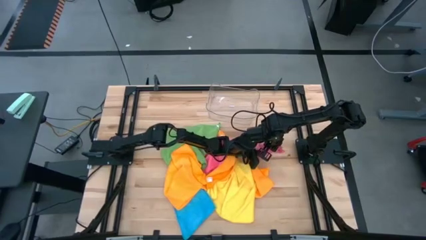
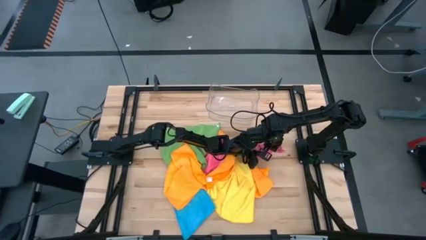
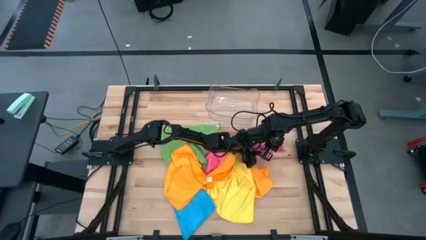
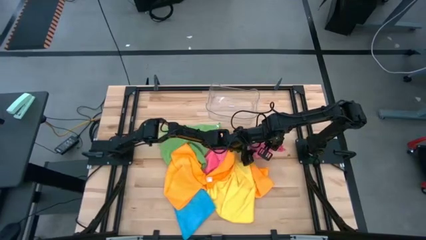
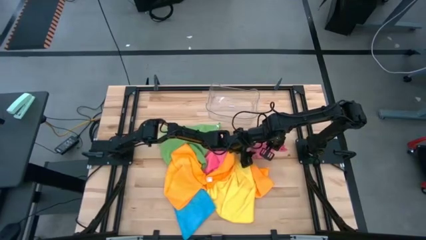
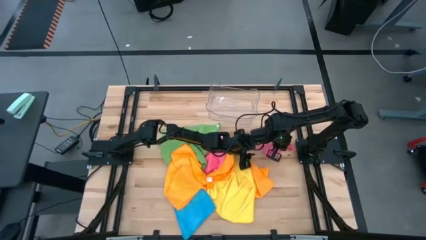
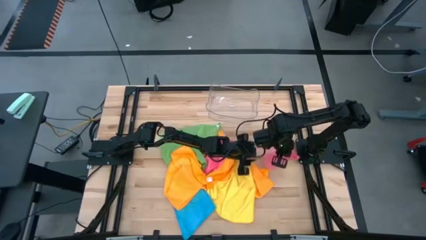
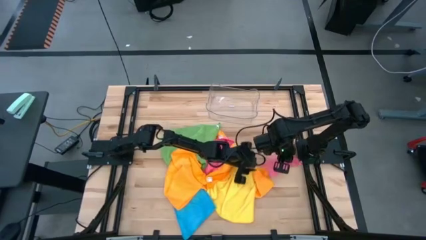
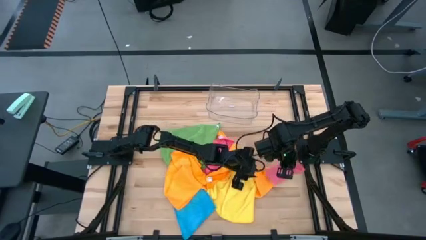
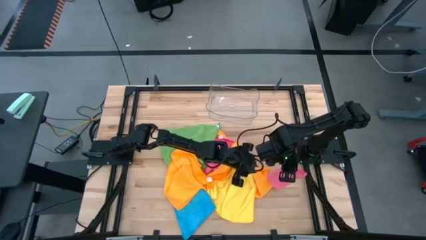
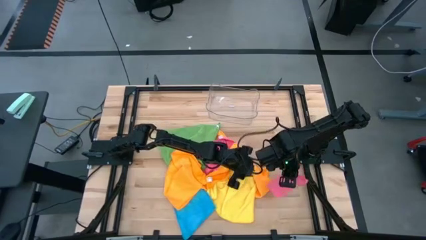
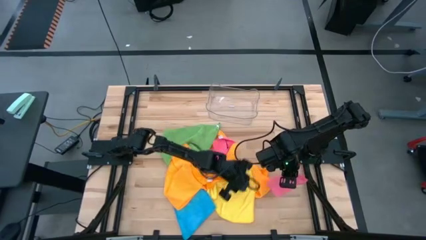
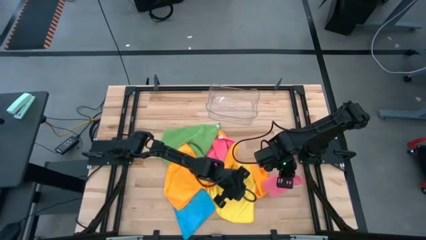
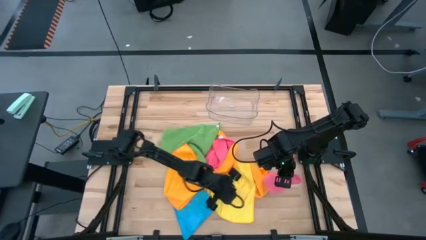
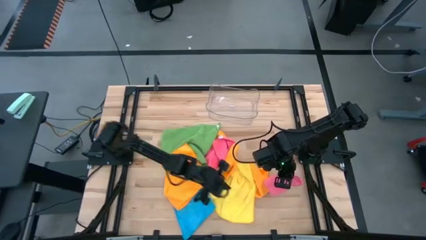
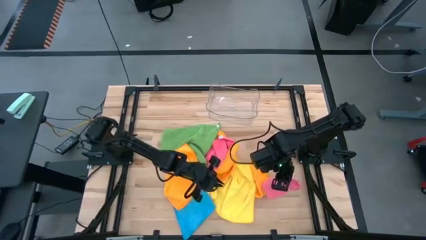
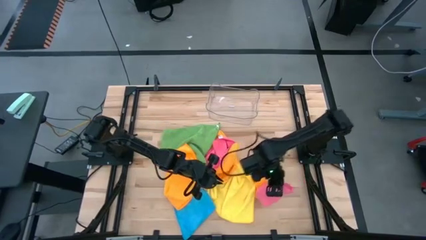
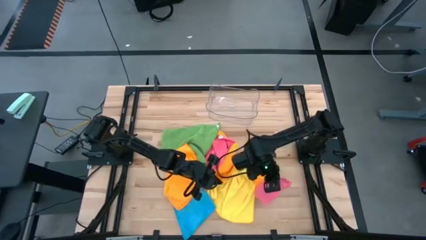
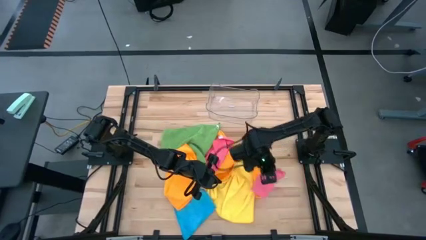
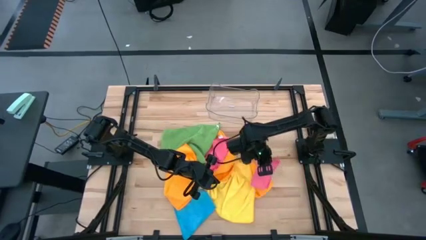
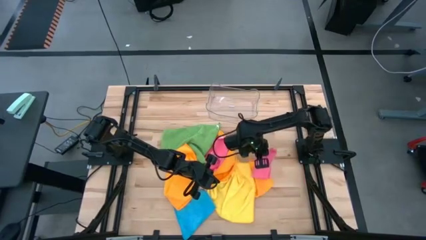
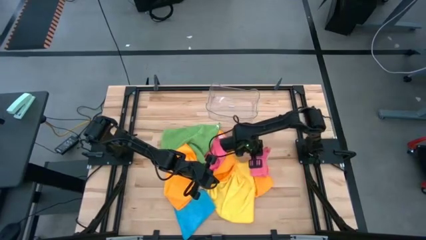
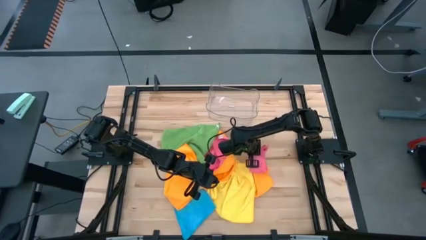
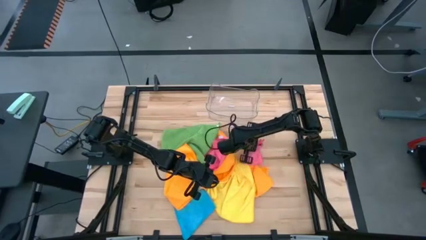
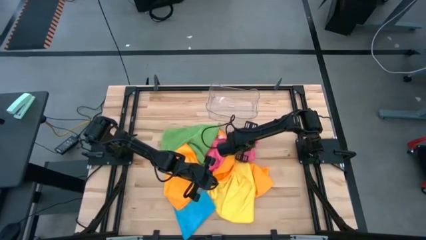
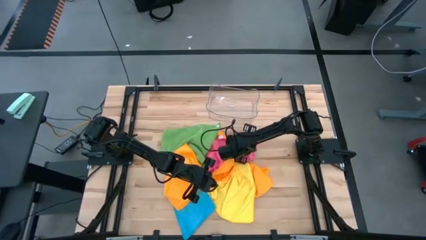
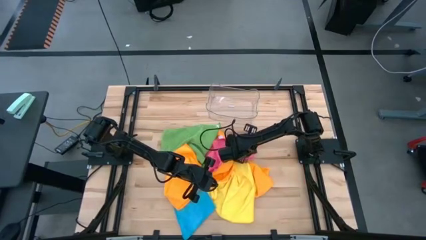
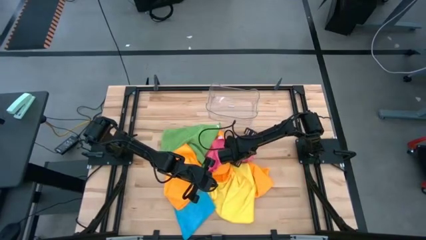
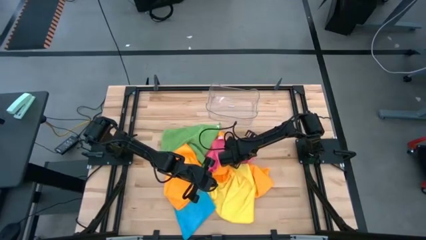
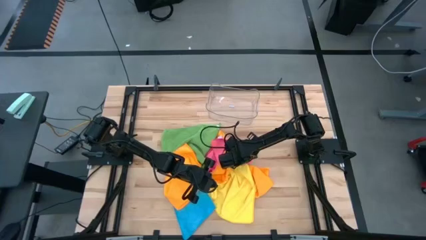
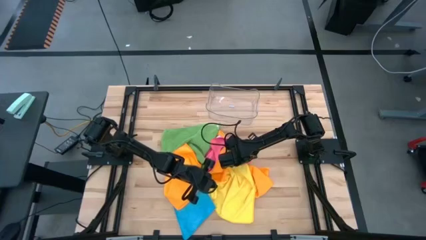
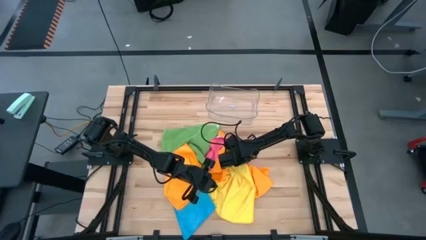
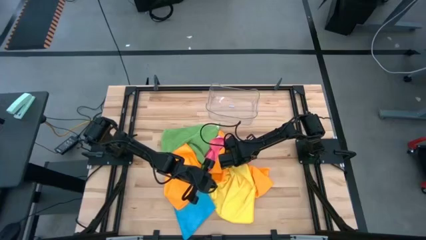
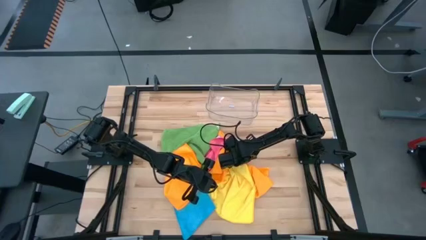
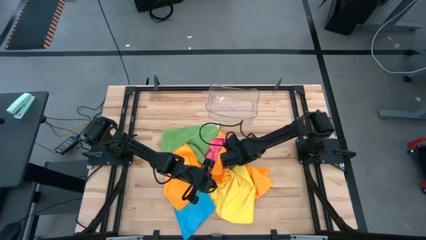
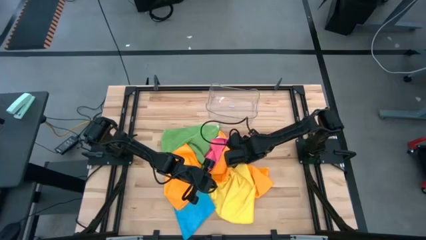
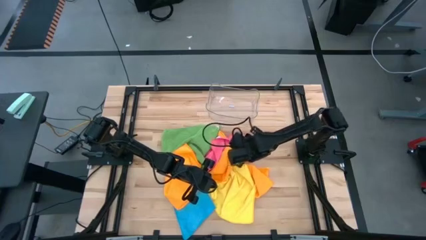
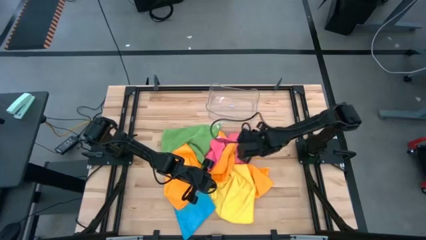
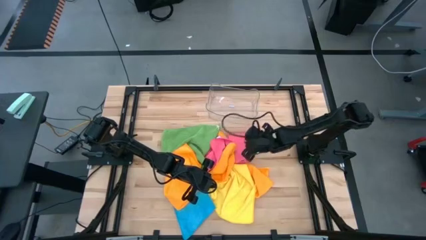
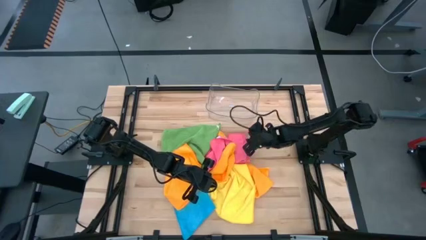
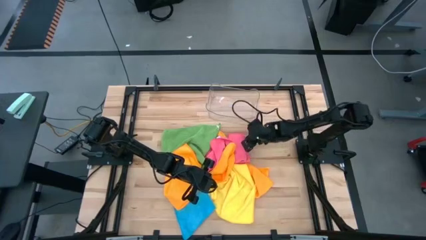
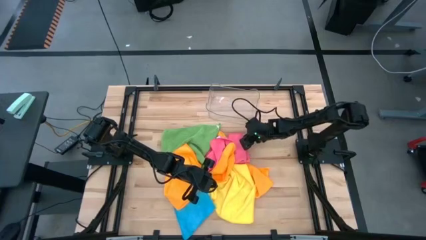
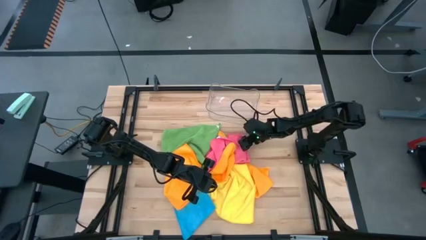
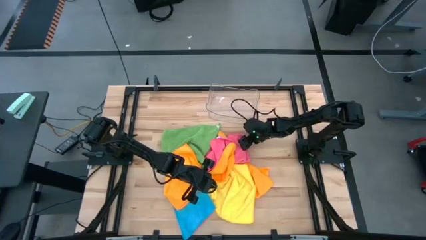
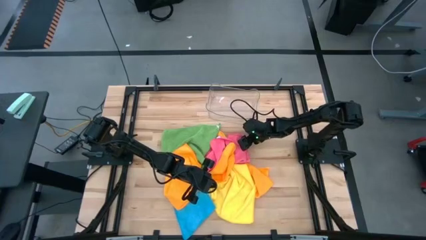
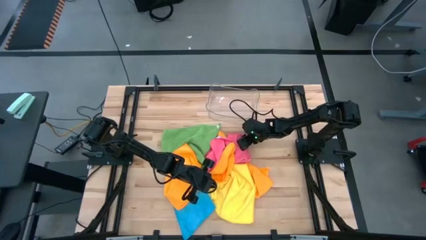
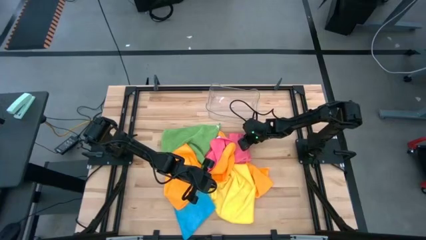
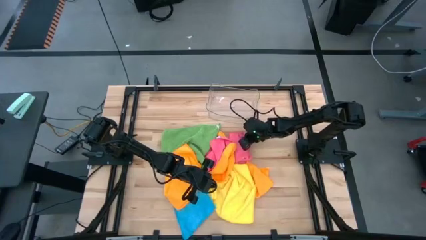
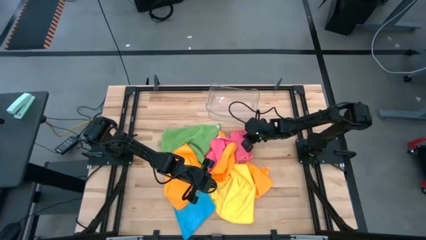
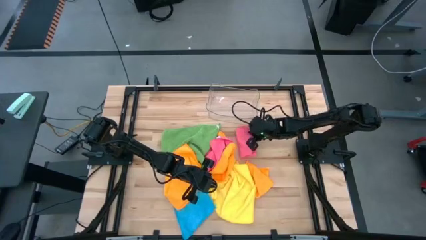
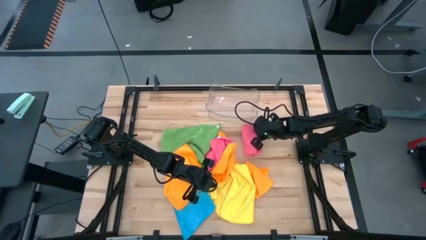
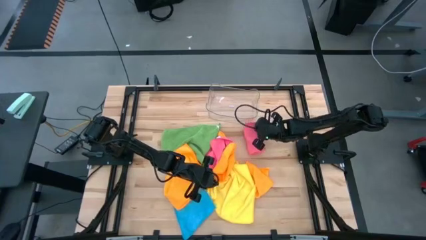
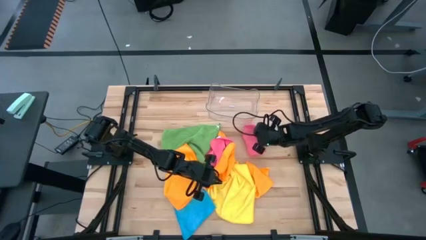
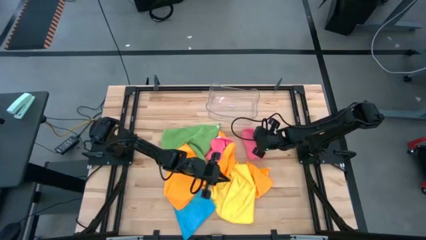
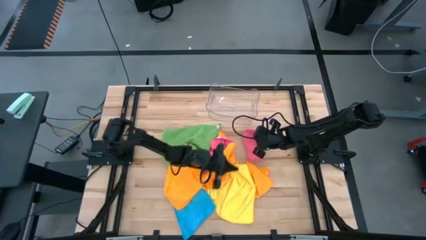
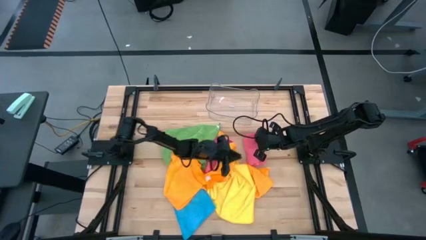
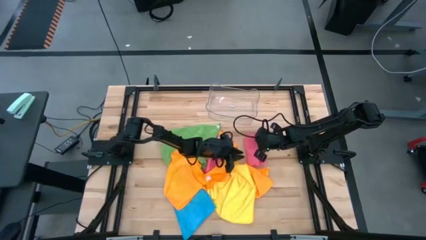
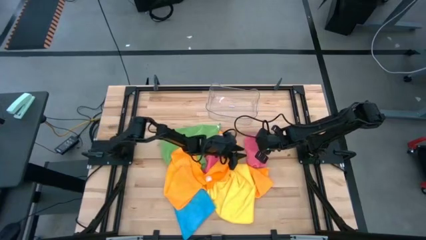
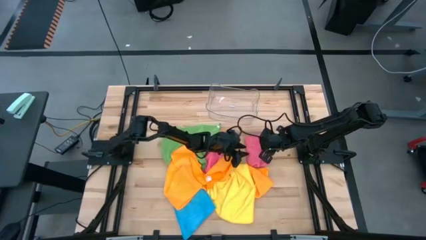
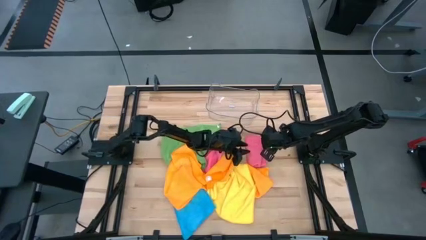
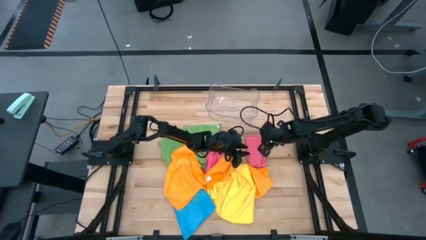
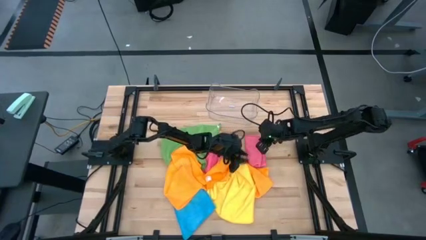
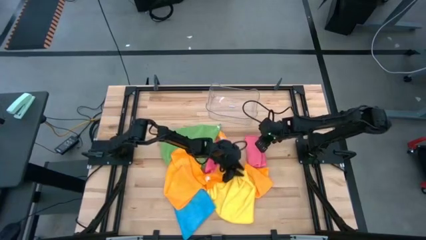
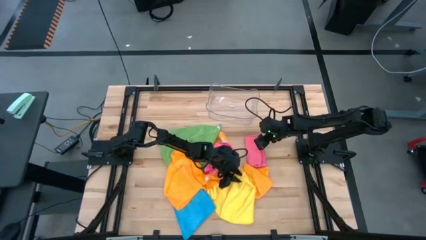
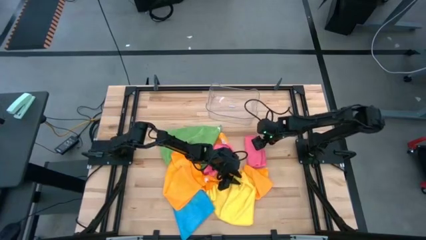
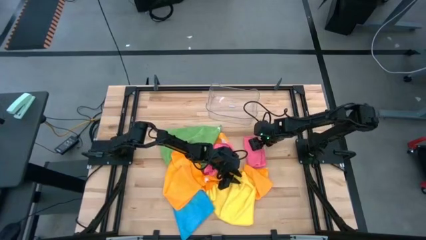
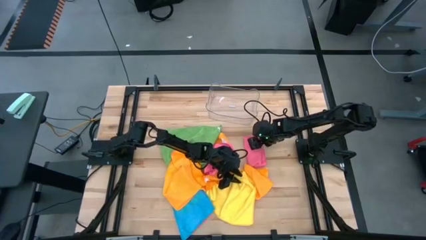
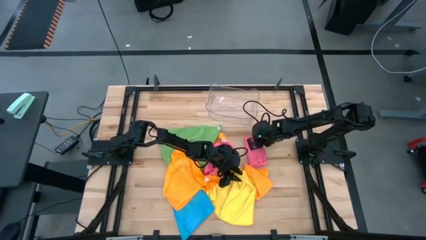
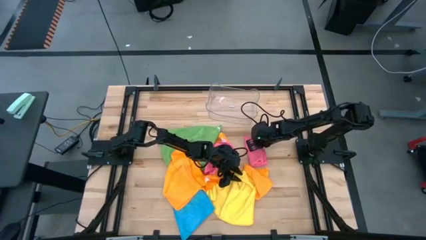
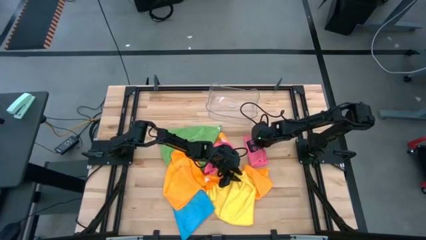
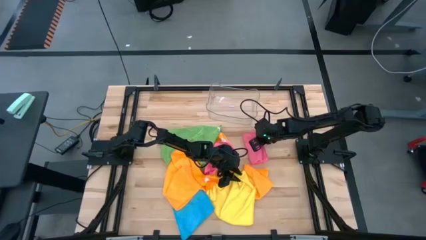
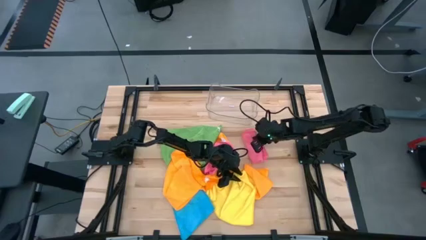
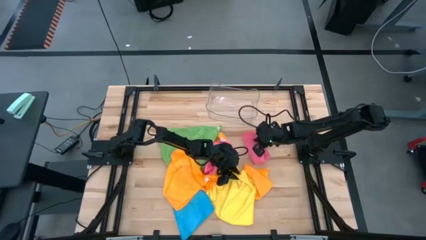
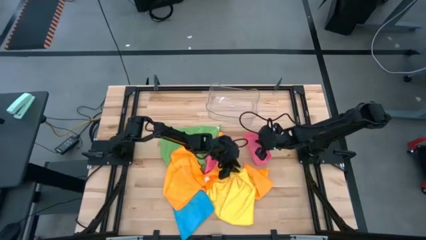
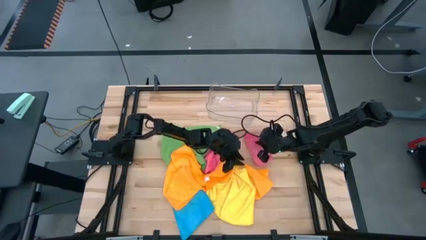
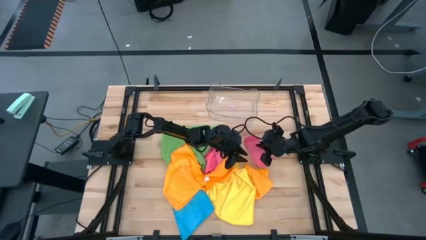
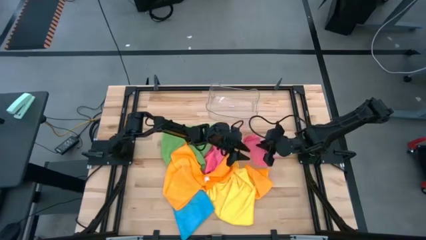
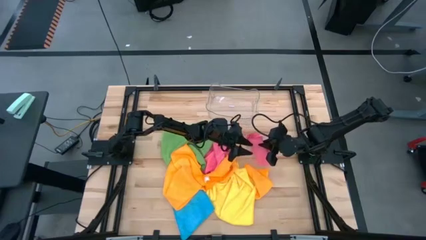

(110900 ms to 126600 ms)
Task: Fold microfiber towels
Fold the pink microfiber cloth
